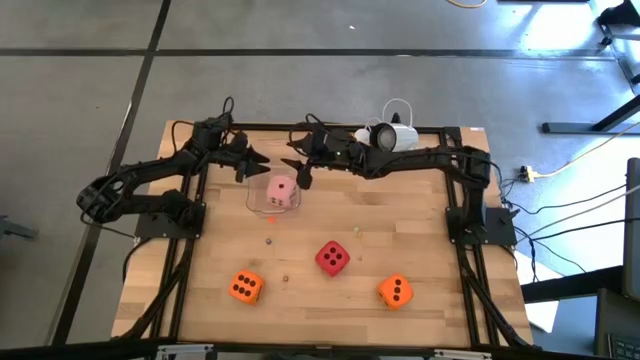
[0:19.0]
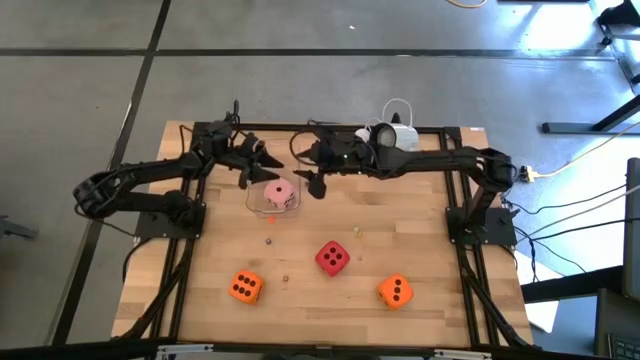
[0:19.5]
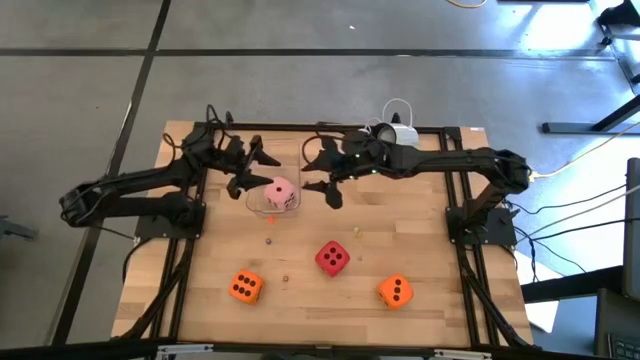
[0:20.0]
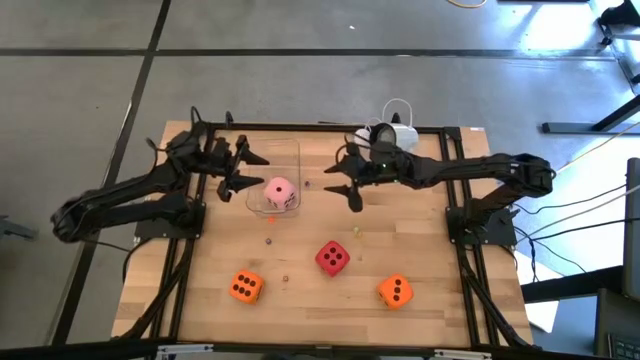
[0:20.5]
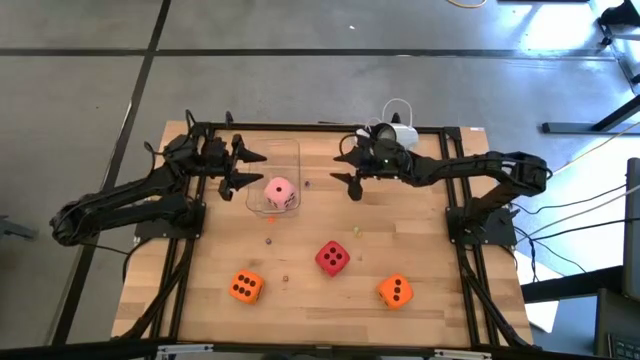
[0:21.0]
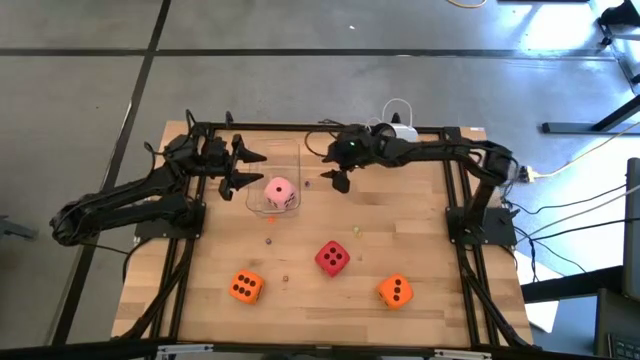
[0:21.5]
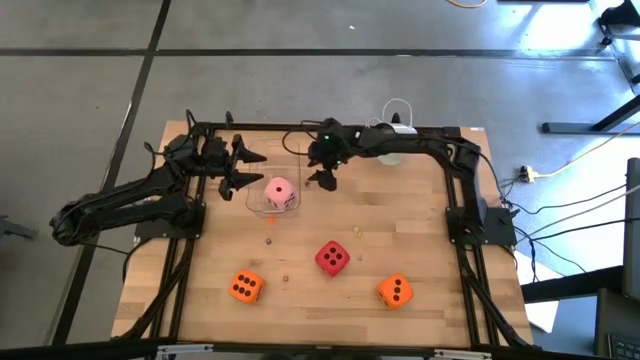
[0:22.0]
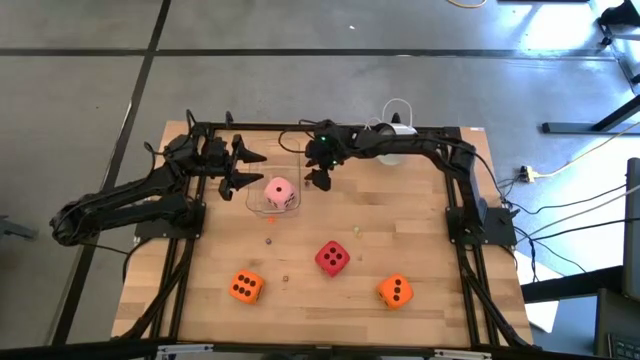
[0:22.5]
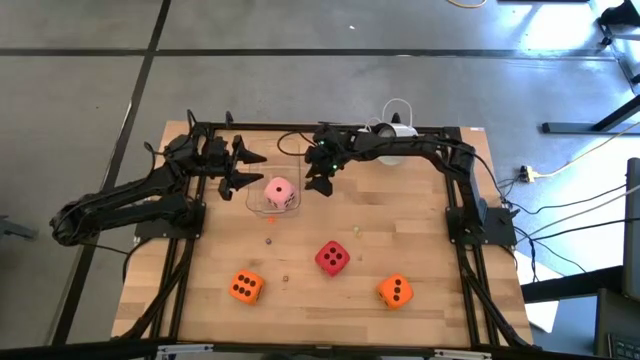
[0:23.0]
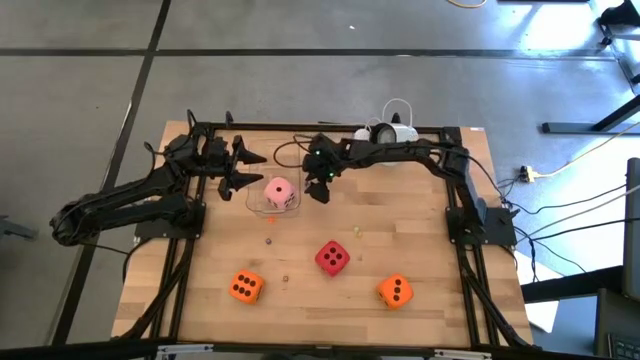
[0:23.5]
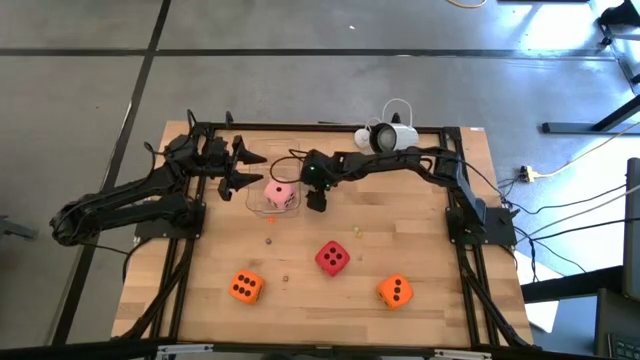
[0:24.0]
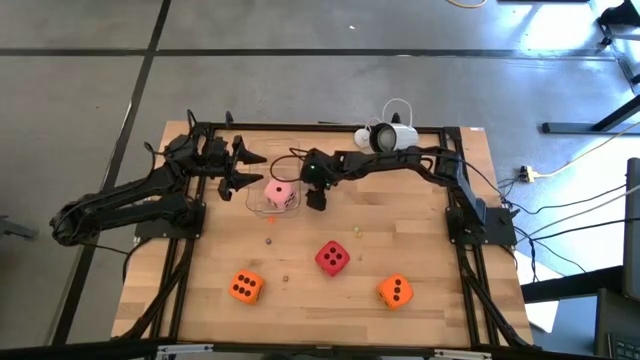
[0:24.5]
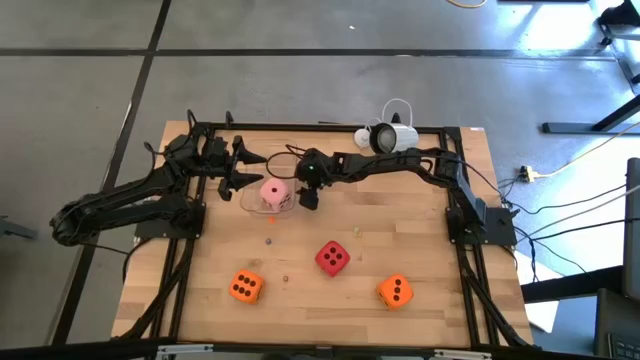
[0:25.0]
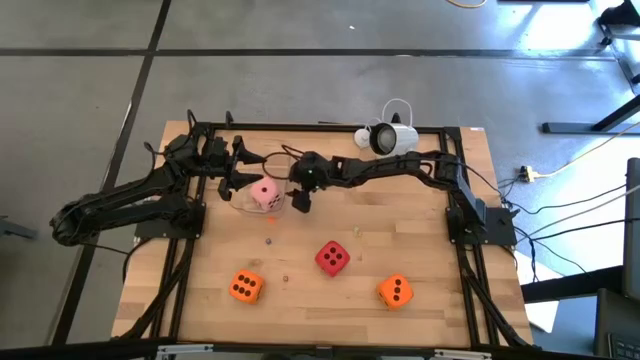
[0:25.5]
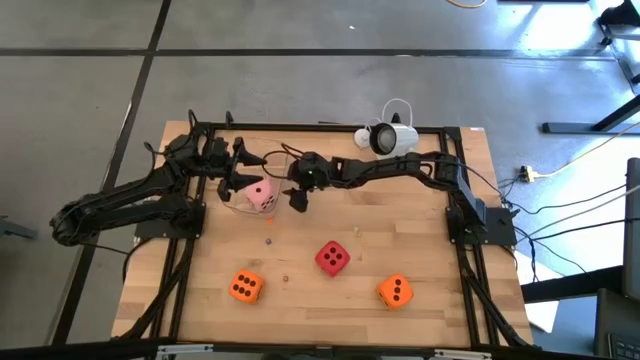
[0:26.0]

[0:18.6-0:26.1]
Task: Pick & Place Dice
Adjust the transparent bin on the table

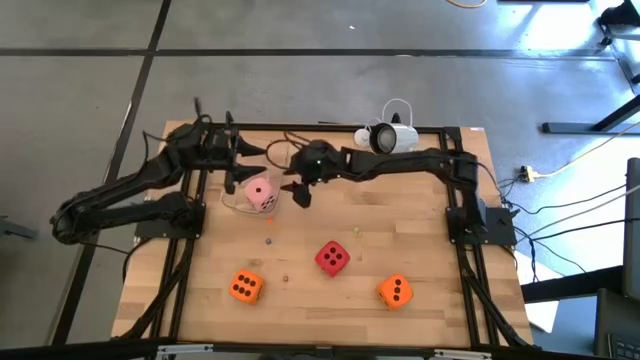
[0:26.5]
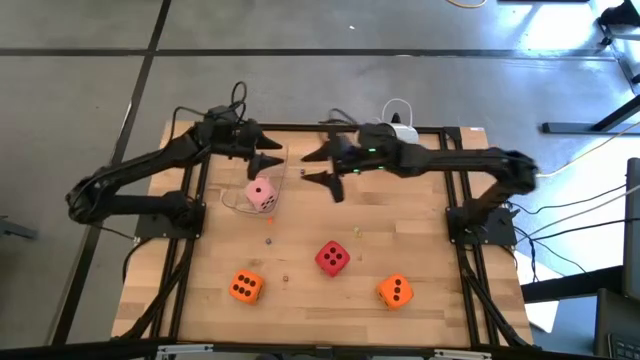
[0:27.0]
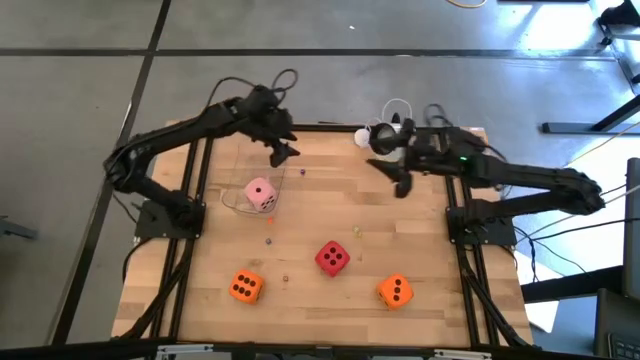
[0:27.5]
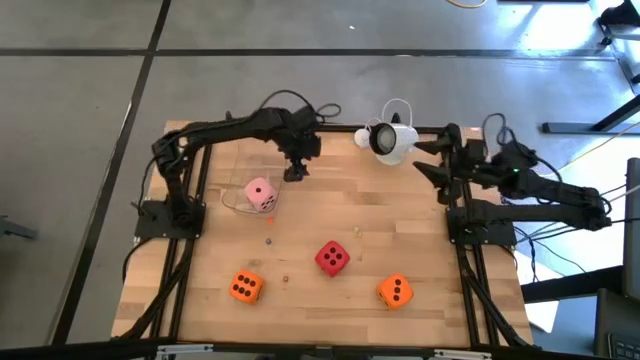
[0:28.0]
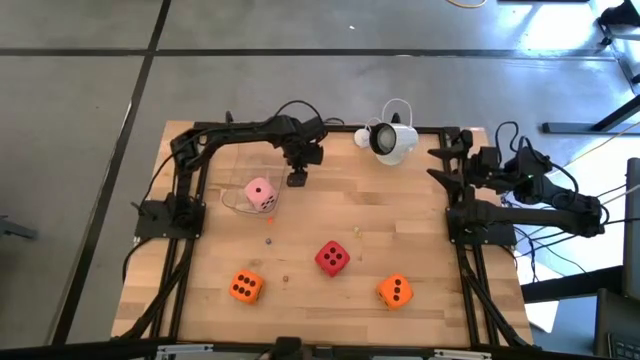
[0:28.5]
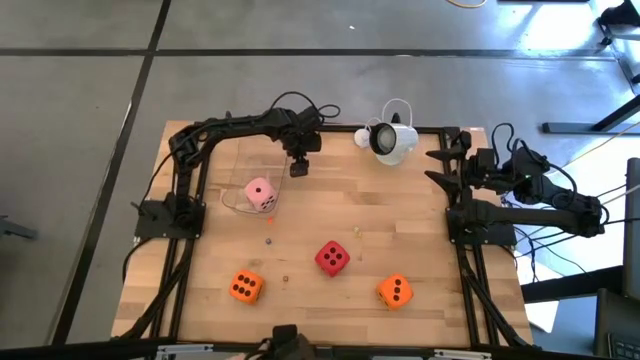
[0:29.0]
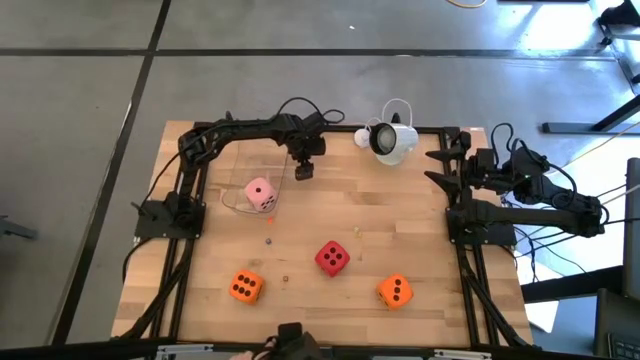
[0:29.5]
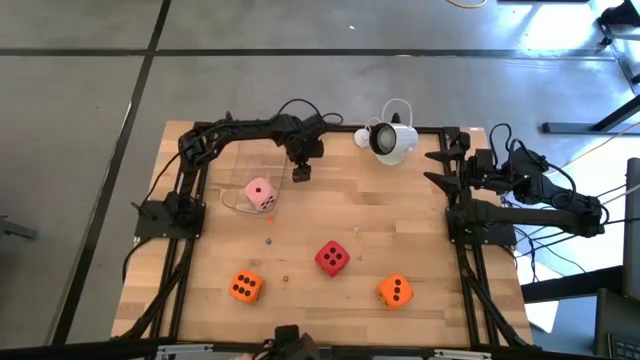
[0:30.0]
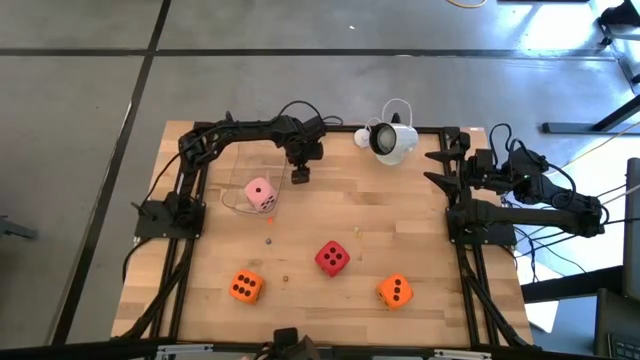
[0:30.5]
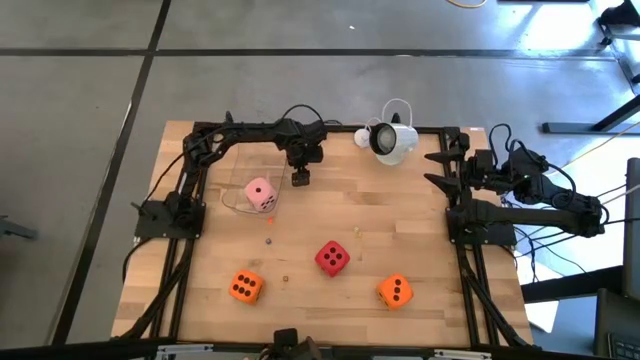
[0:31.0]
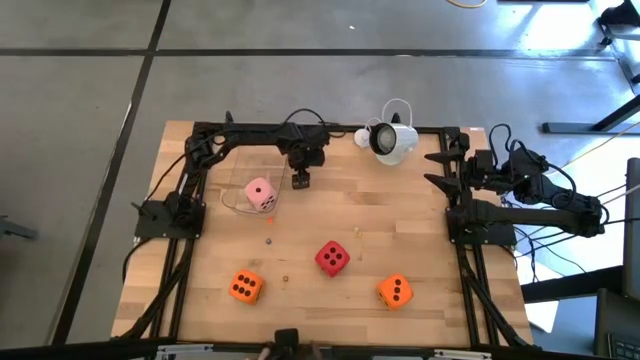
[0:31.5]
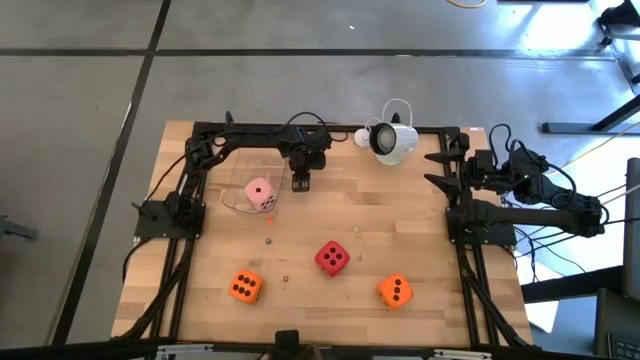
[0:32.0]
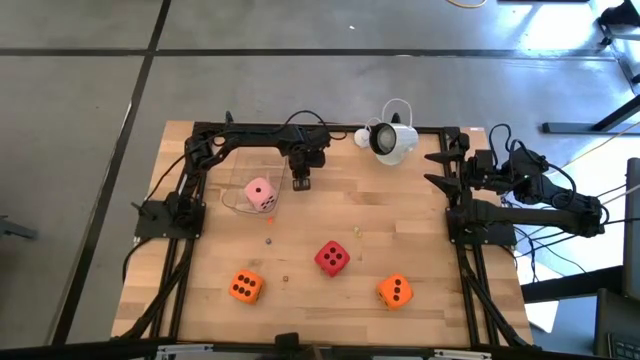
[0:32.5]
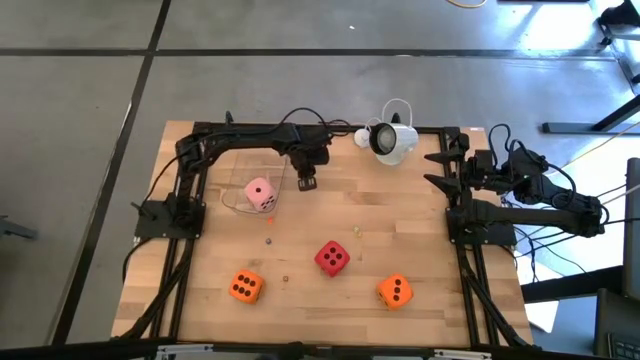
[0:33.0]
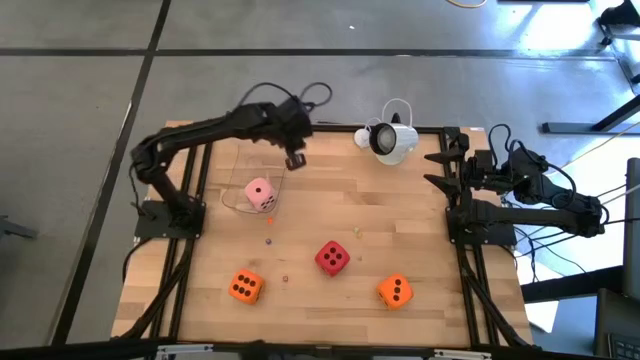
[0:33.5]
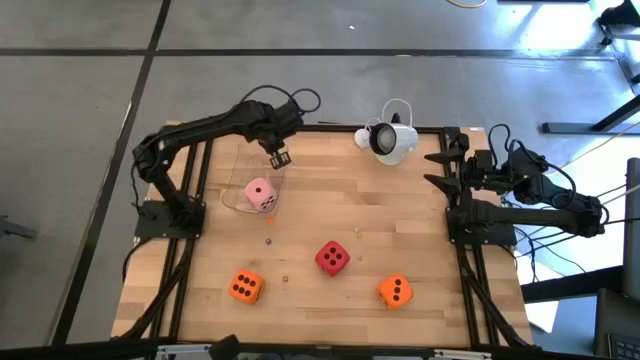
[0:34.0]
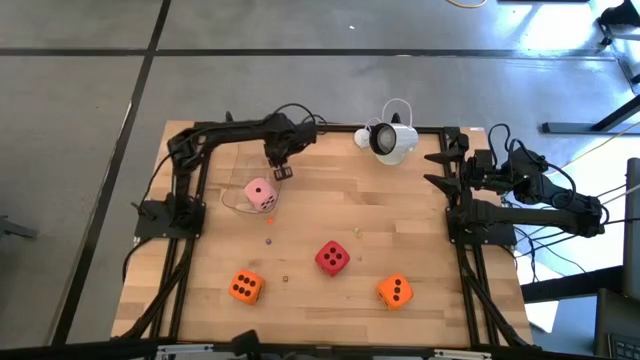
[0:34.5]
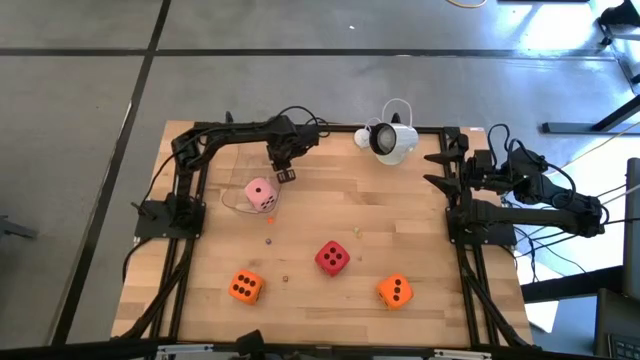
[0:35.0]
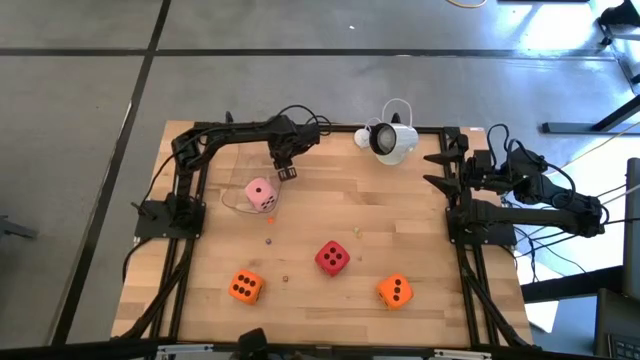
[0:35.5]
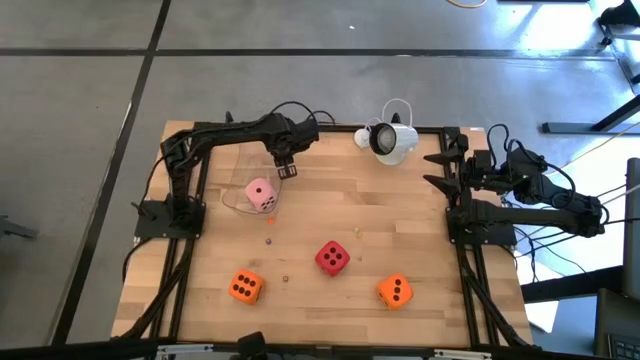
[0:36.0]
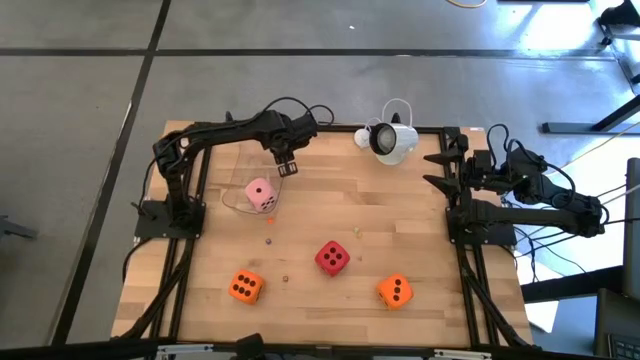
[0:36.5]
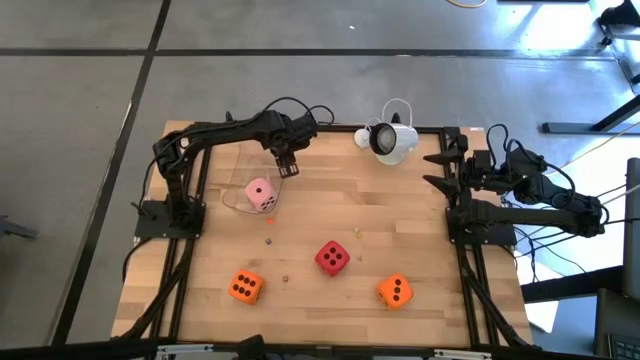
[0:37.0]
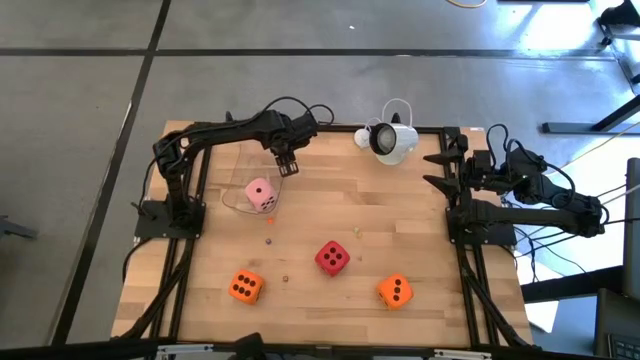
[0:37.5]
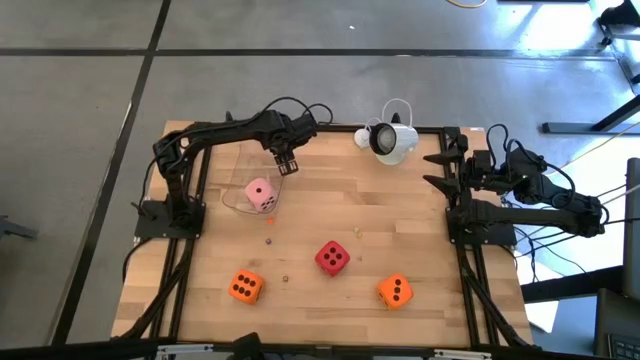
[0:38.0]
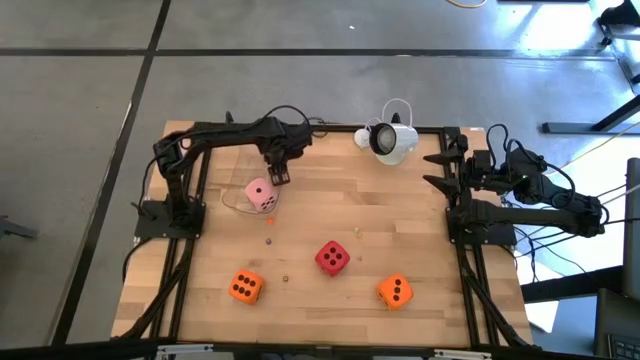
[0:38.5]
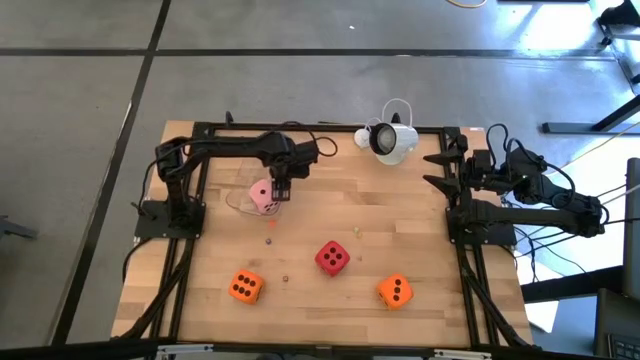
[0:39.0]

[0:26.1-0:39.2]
Put the small blue die into the transparent bin
